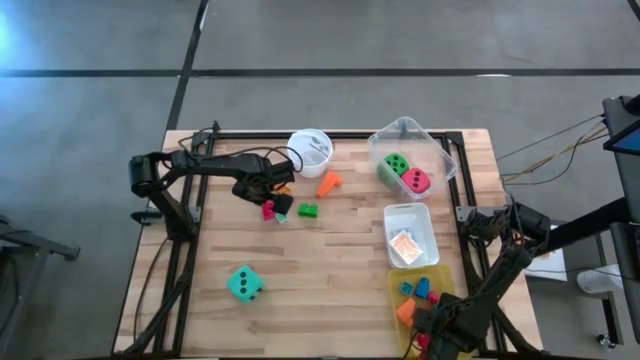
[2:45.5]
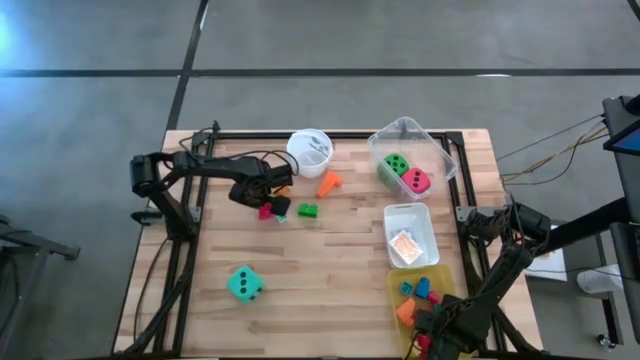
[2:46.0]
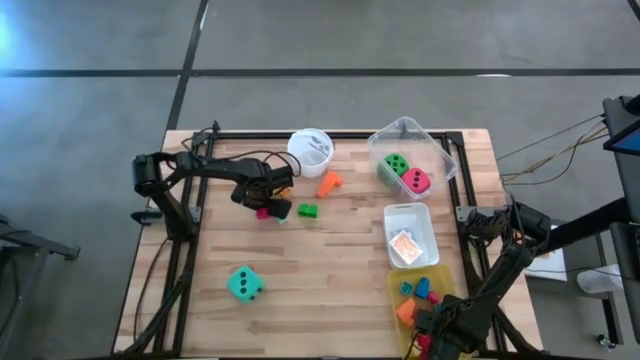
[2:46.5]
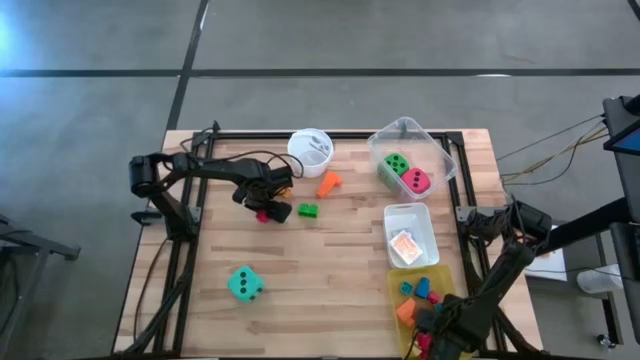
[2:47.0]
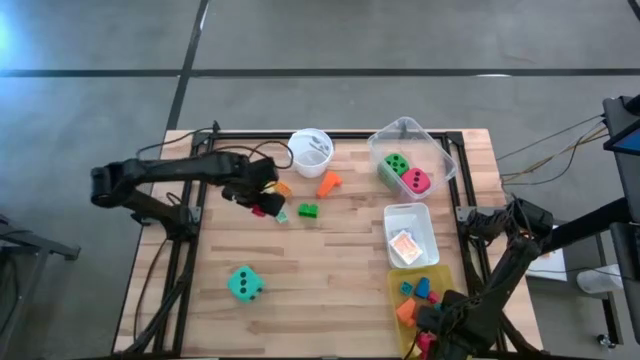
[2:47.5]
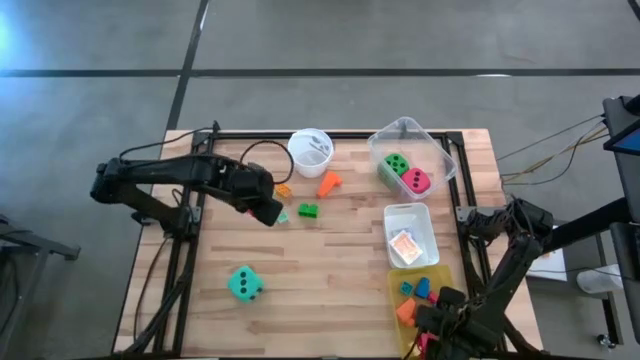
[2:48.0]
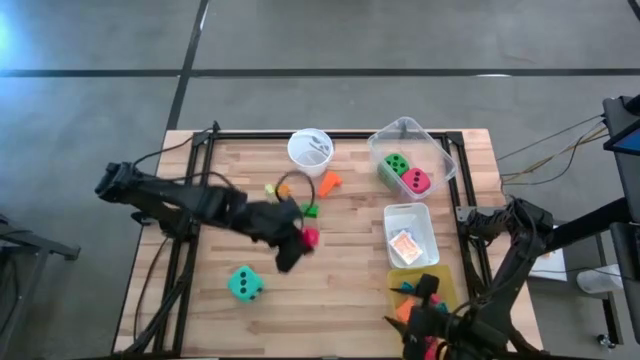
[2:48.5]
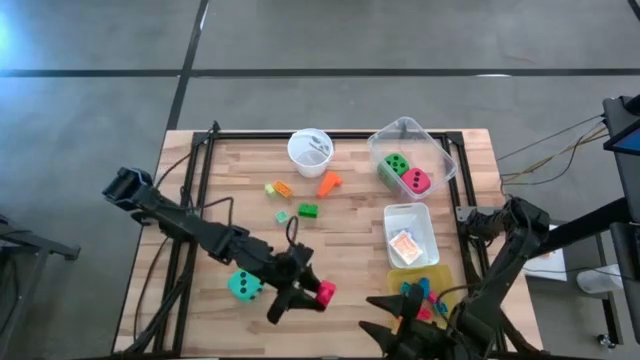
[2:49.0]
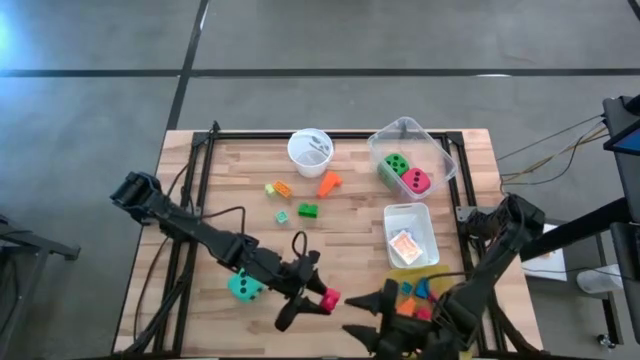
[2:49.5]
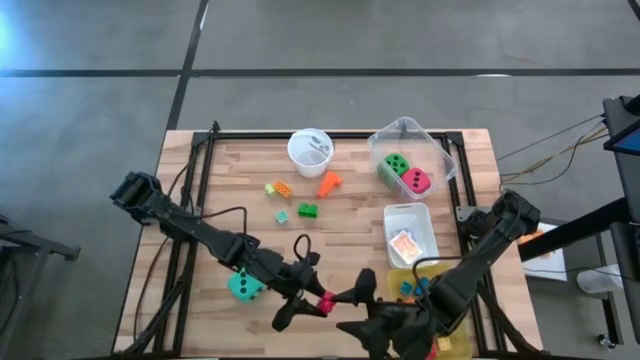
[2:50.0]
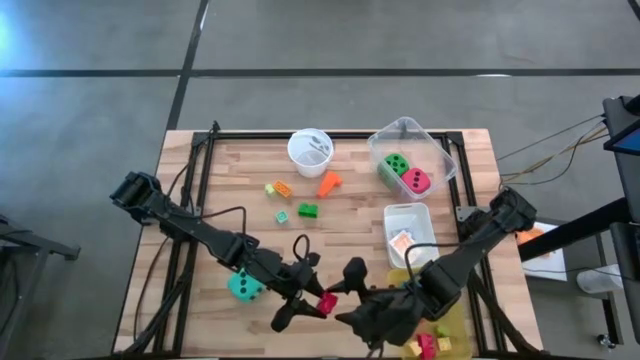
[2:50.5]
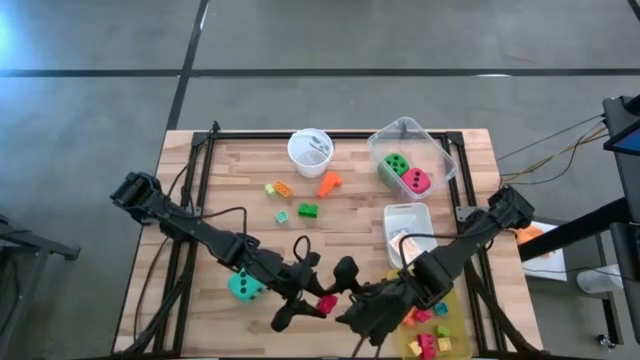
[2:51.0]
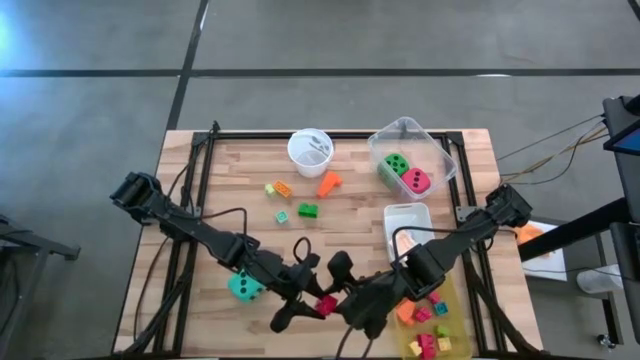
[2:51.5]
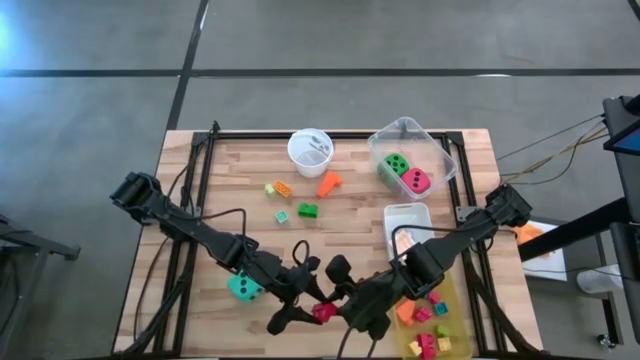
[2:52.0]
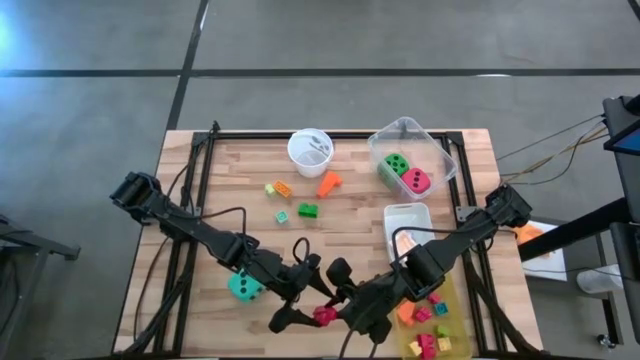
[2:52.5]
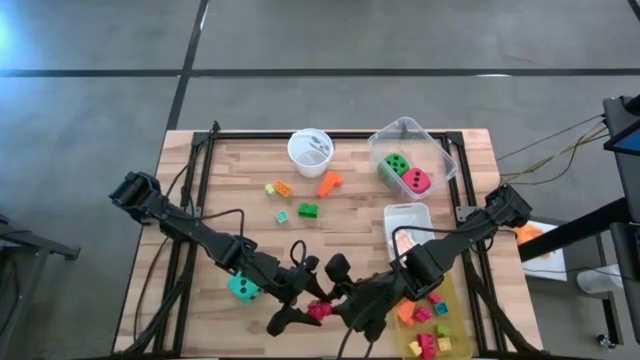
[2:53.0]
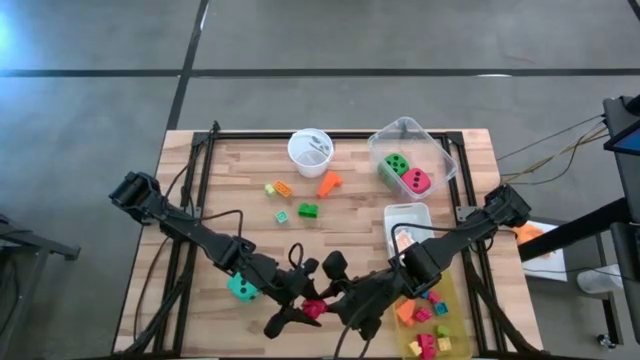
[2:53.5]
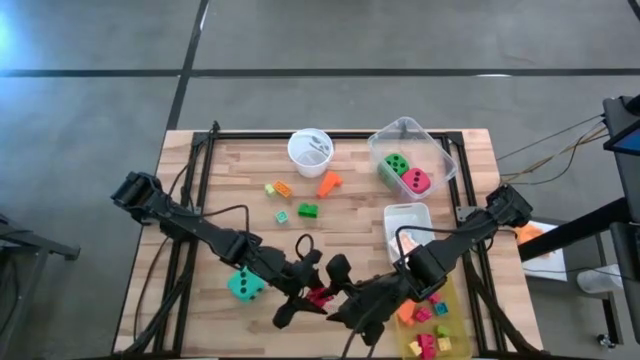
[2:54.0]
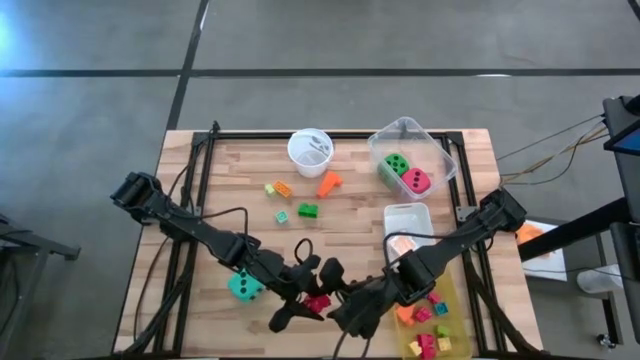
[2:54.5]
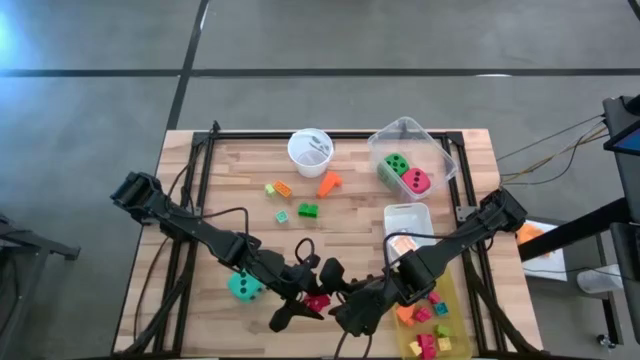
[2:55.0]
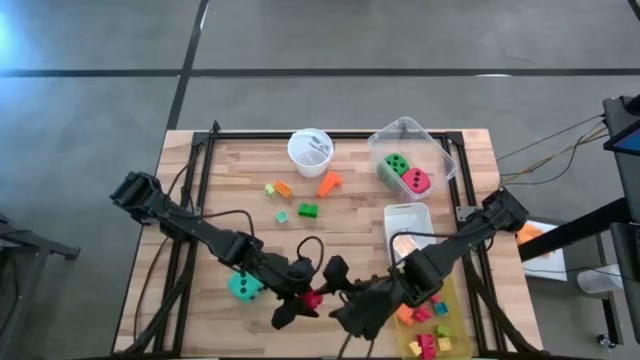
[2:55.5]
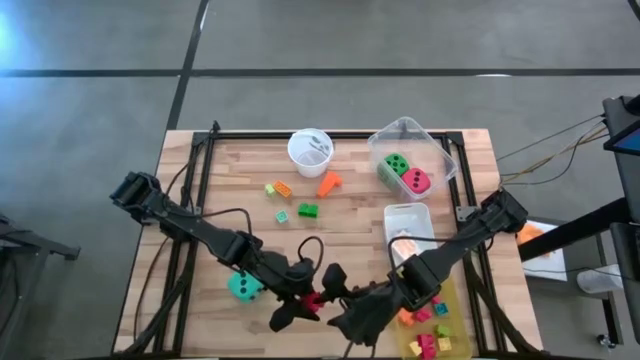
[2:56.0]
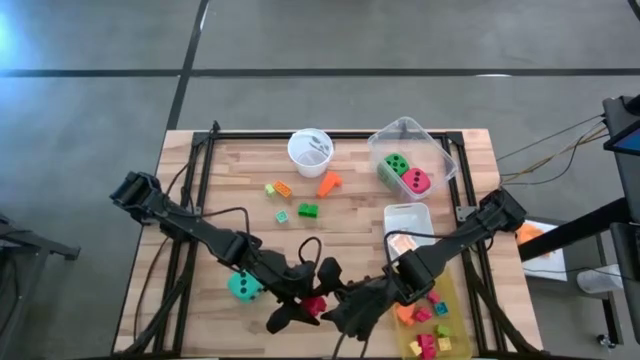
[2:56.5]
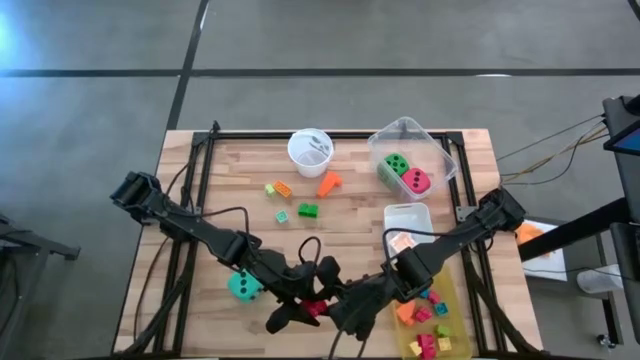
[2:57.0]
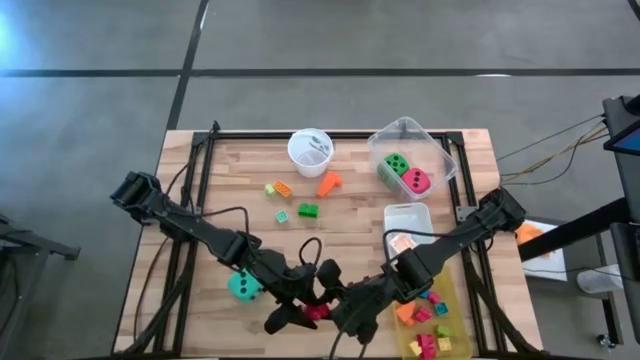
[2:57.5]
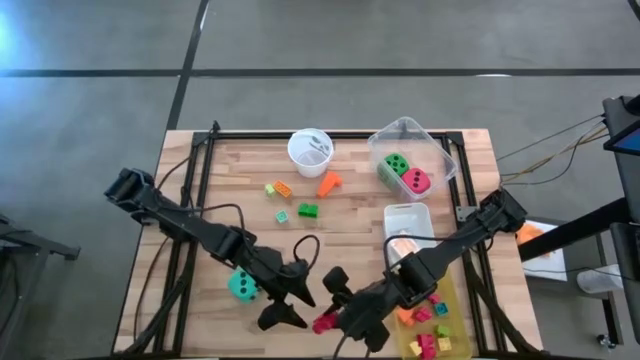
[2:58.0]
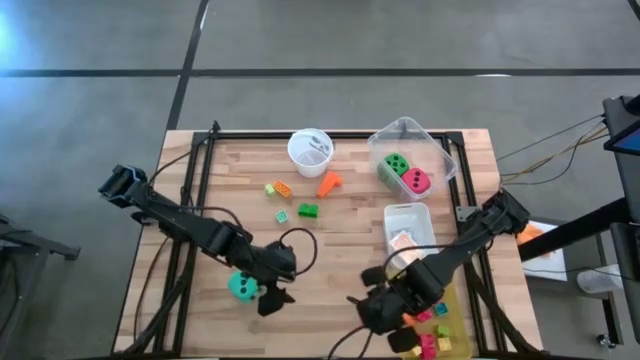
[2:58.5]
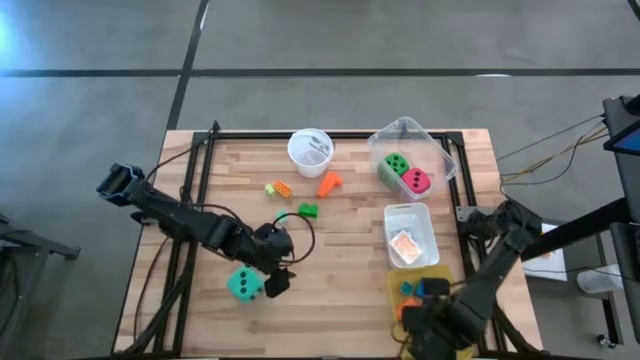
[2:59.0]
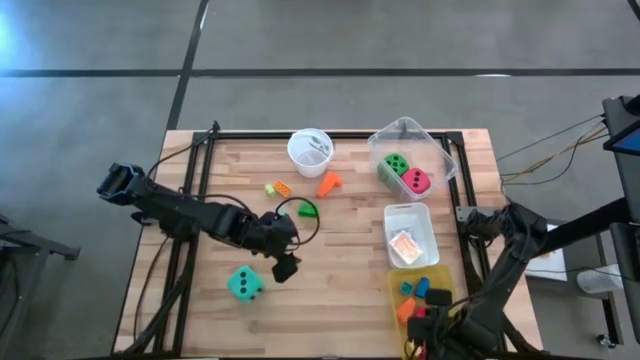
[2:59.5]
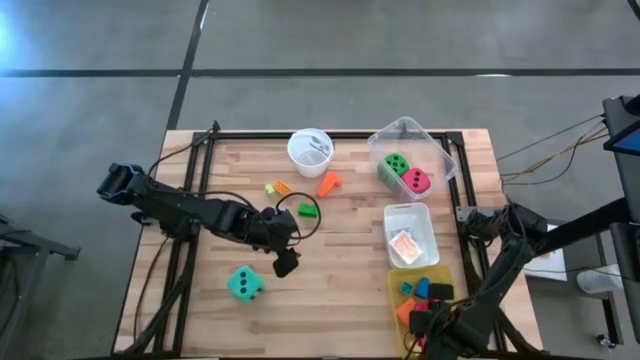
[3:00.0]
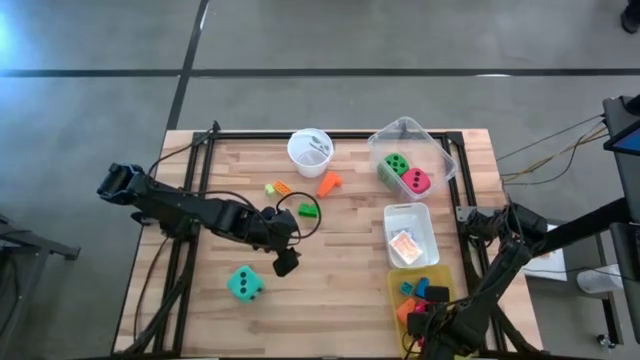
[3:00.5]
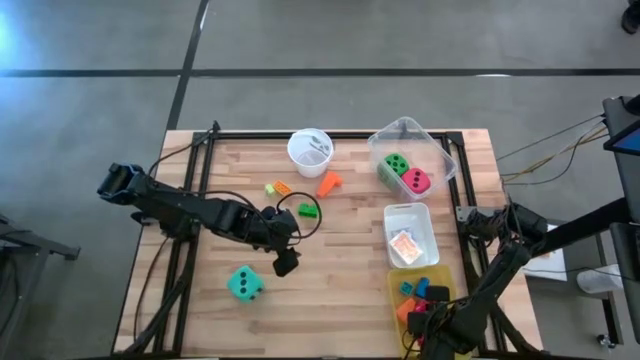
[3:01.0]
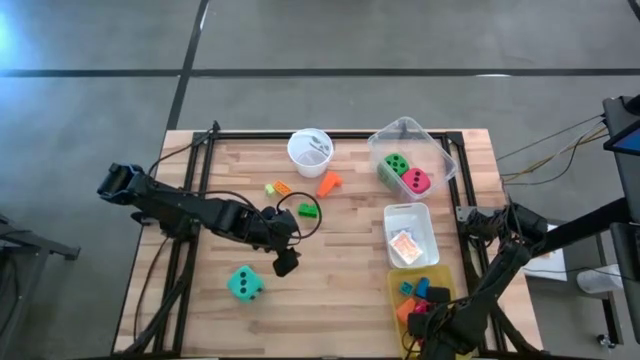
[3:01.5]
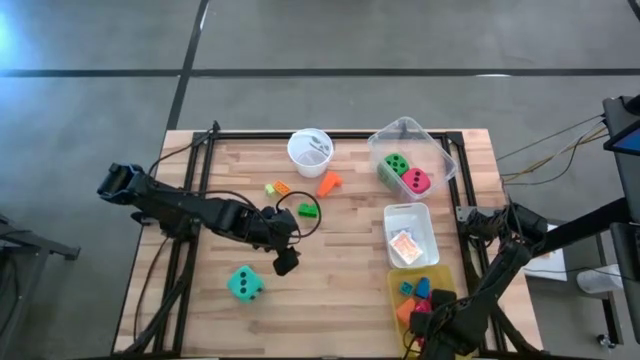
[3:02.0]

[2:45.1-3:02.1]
Task: Pick & Place Toys
Put the red game piece into the yellow bin

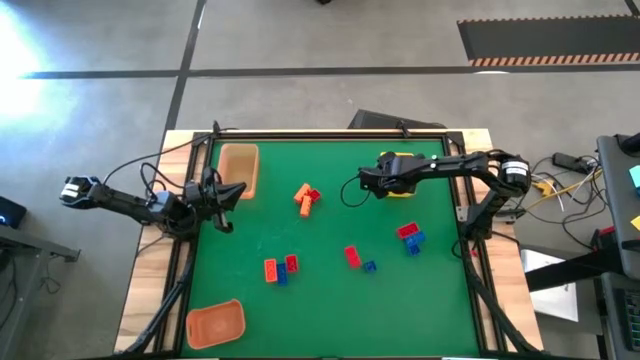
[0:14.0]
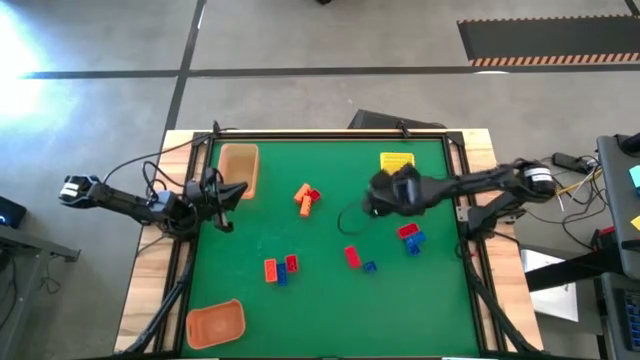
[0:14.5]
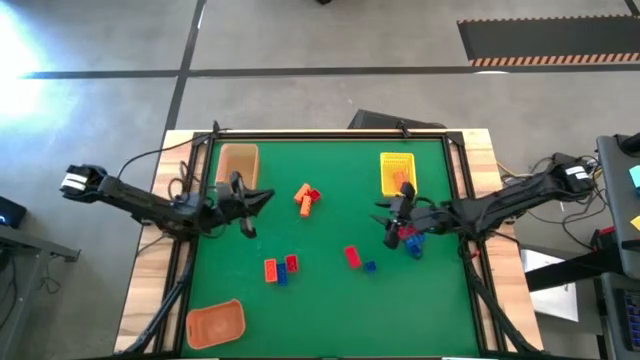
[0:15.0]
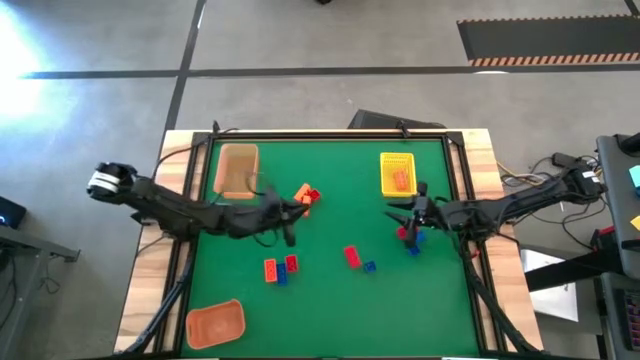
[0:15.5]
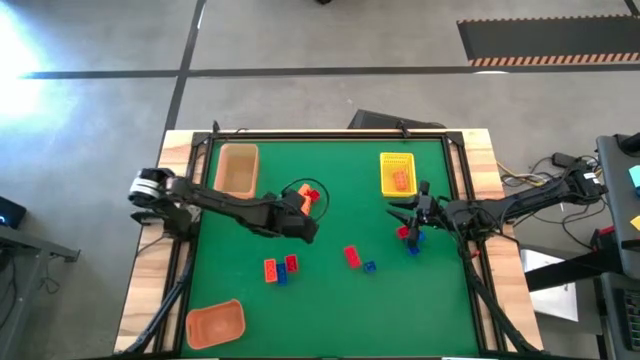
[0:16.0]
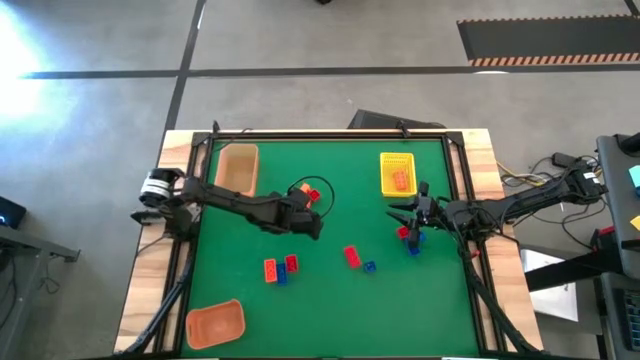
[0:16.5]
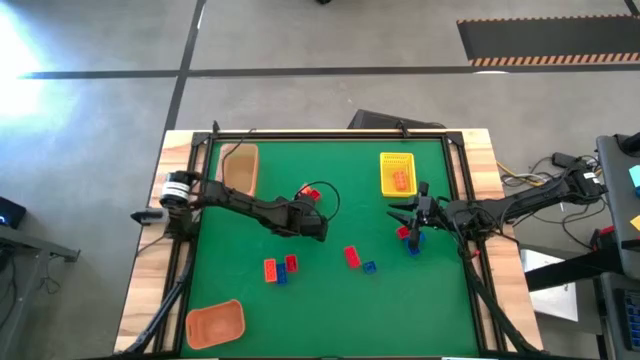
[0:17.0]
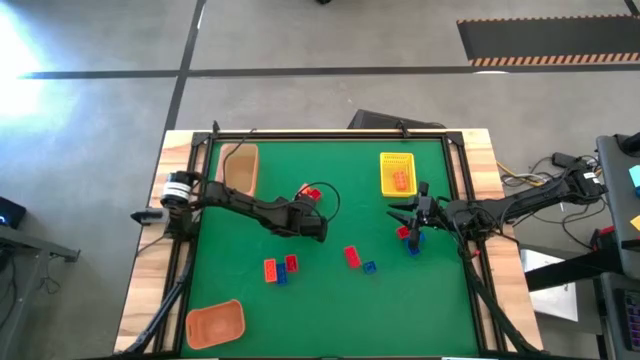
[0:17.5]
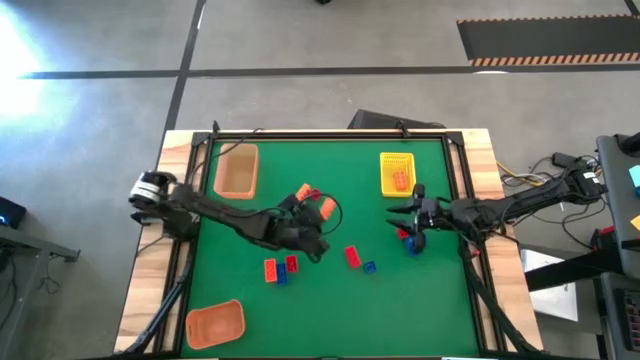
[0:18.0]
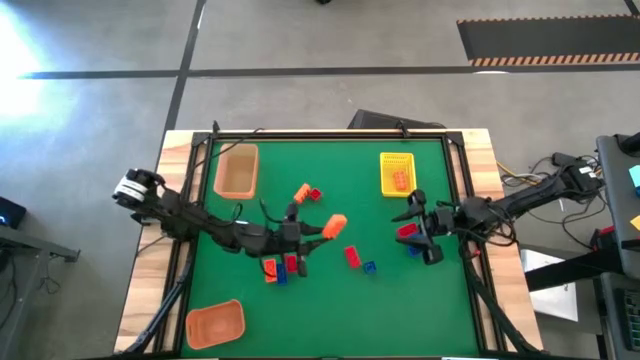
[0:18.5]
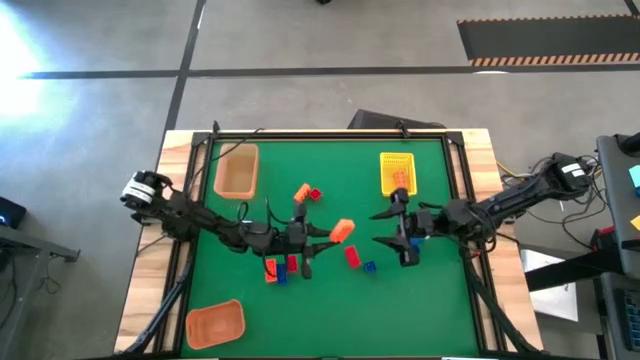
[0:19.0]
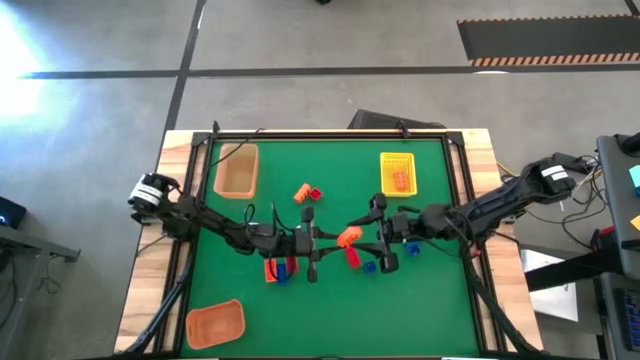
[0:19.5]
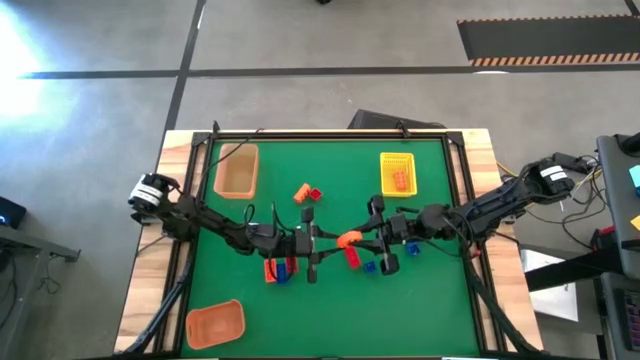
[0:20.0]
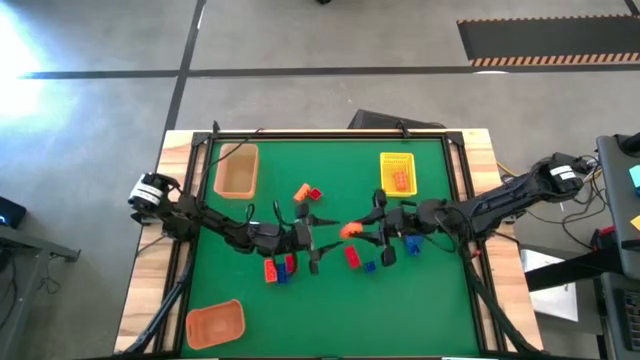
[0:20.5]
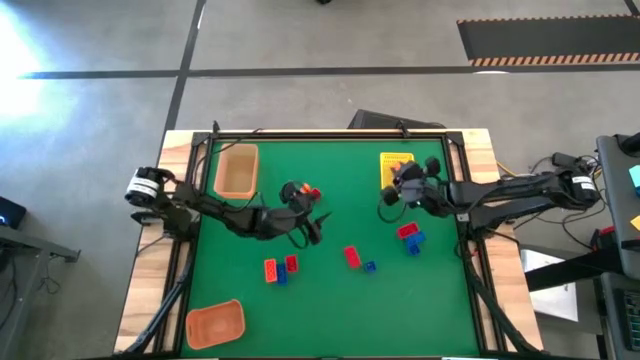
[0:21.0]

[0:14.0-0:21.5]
Task: Sort & place blocks by color
Put the orange game piece into the yellow bin
